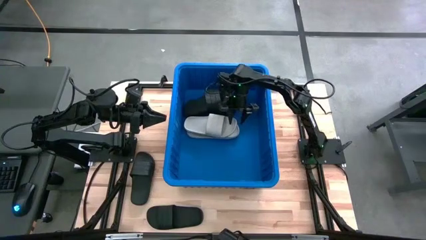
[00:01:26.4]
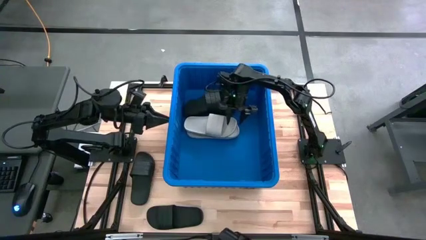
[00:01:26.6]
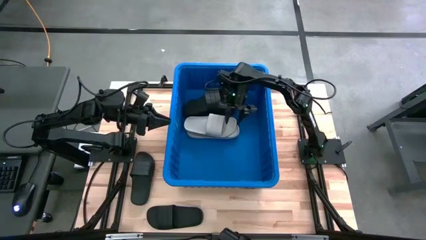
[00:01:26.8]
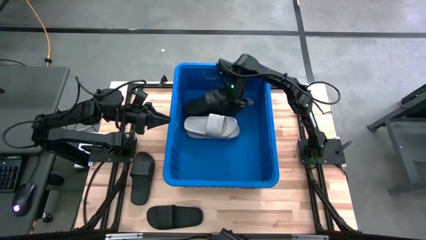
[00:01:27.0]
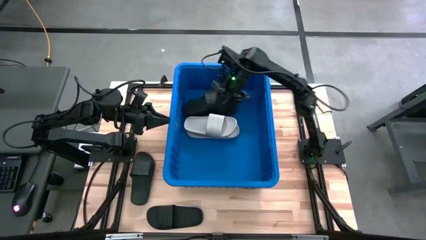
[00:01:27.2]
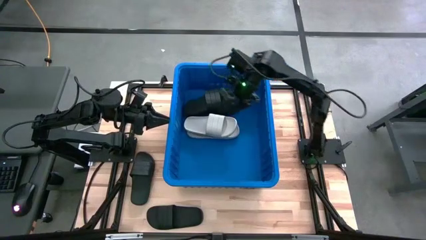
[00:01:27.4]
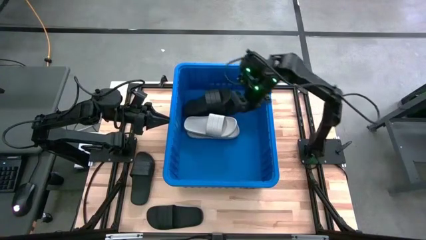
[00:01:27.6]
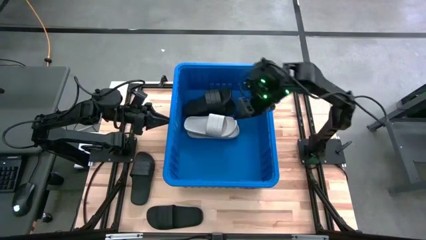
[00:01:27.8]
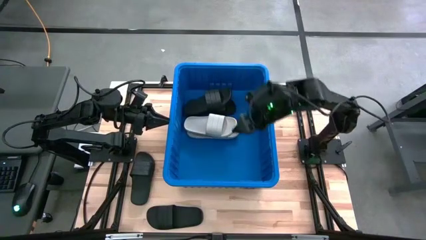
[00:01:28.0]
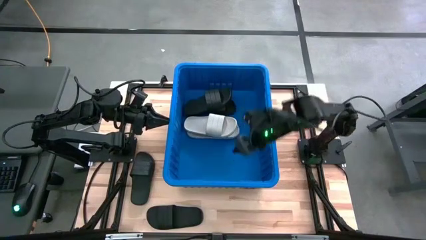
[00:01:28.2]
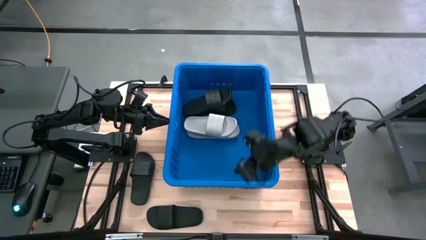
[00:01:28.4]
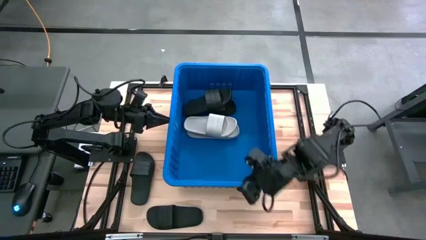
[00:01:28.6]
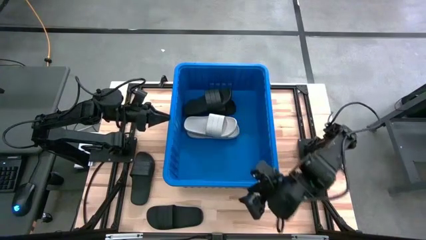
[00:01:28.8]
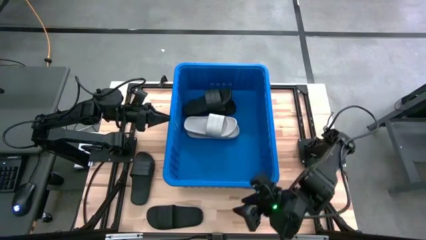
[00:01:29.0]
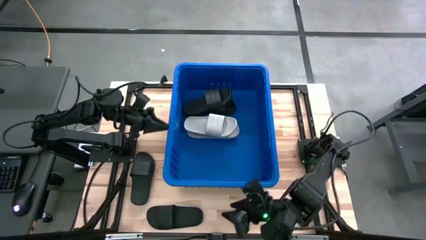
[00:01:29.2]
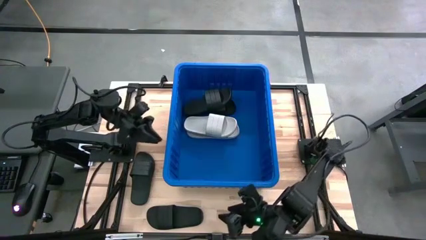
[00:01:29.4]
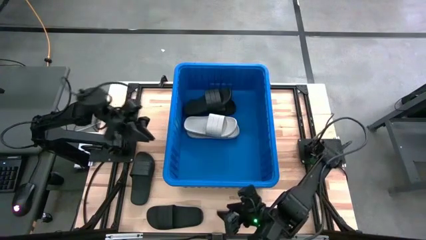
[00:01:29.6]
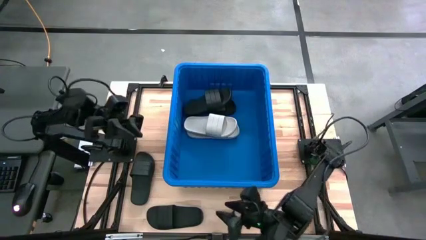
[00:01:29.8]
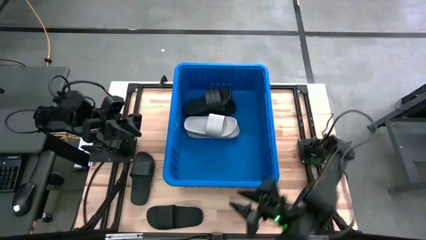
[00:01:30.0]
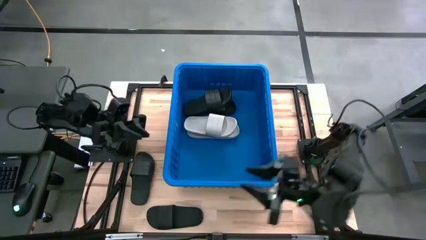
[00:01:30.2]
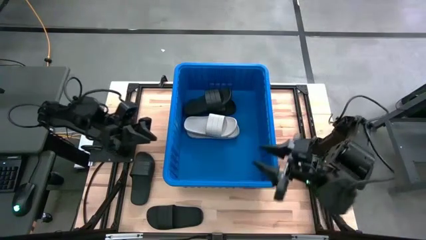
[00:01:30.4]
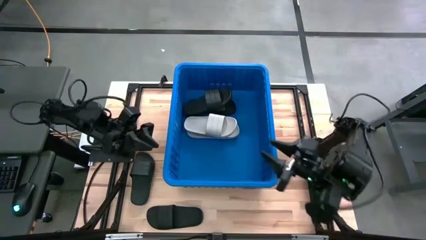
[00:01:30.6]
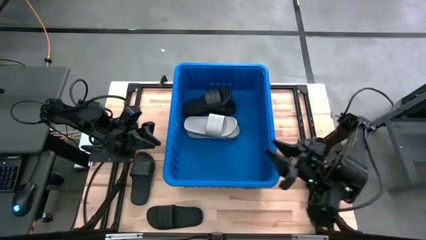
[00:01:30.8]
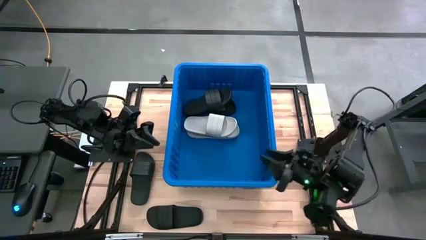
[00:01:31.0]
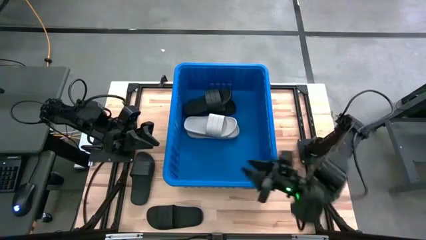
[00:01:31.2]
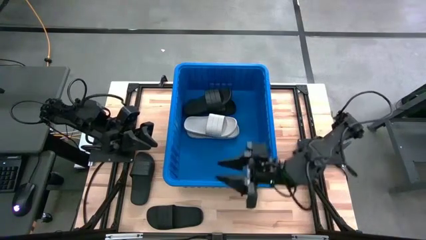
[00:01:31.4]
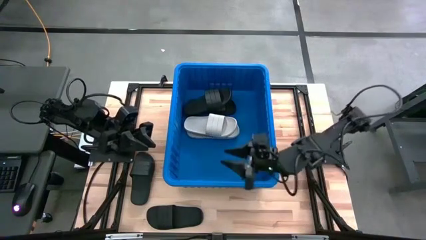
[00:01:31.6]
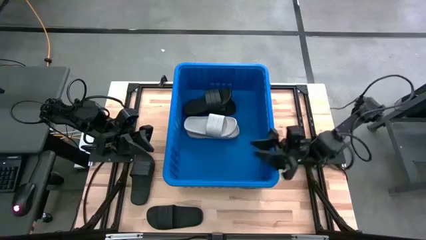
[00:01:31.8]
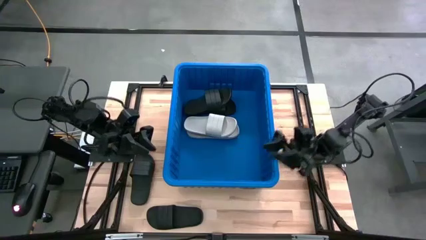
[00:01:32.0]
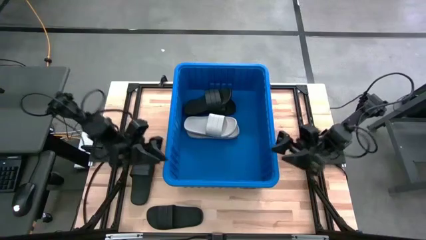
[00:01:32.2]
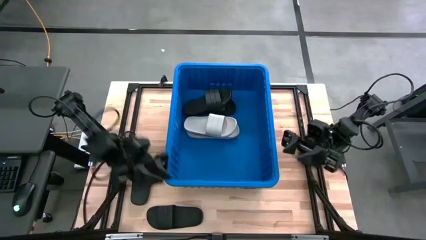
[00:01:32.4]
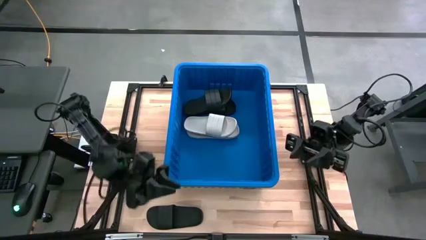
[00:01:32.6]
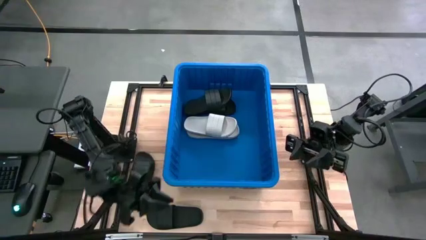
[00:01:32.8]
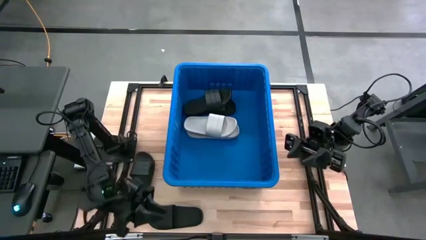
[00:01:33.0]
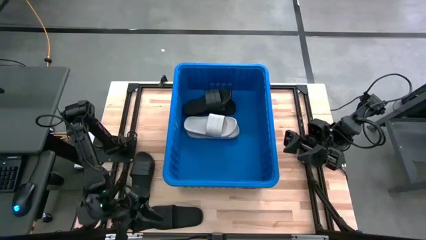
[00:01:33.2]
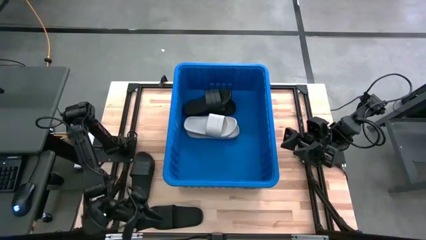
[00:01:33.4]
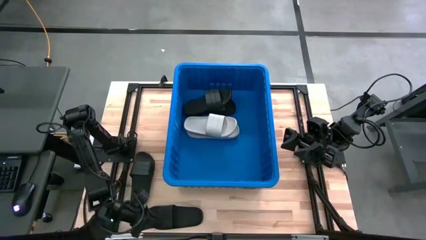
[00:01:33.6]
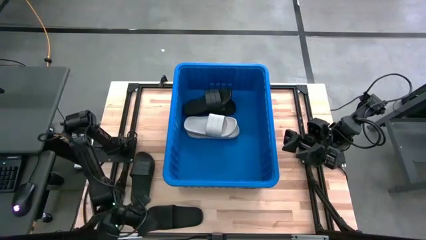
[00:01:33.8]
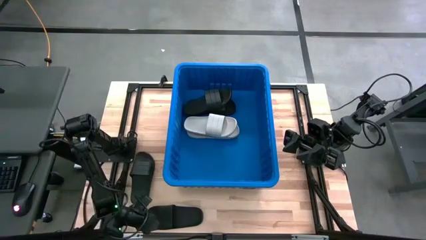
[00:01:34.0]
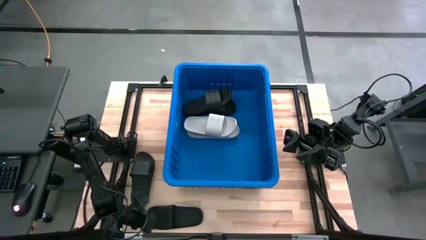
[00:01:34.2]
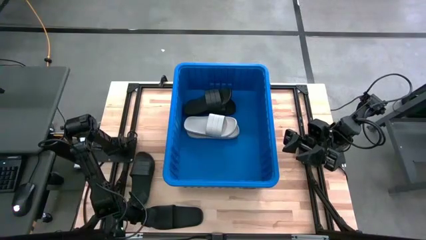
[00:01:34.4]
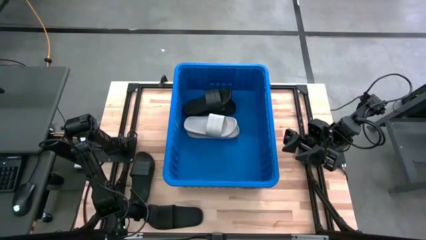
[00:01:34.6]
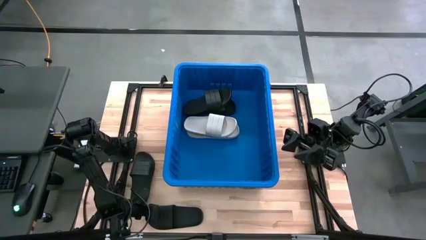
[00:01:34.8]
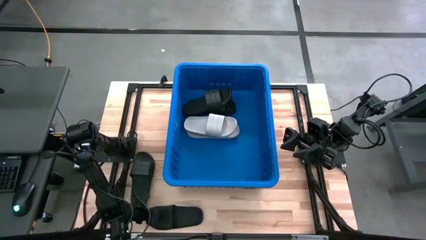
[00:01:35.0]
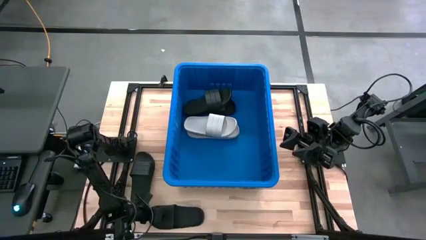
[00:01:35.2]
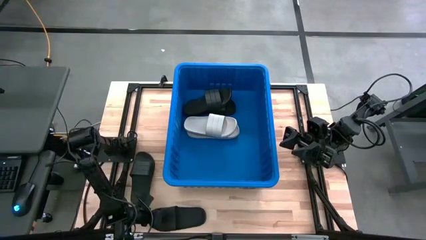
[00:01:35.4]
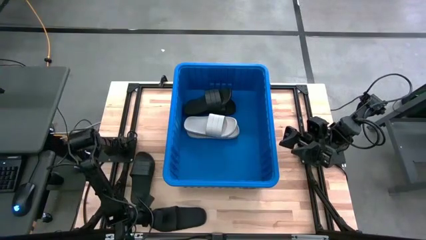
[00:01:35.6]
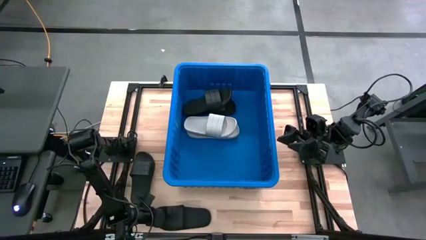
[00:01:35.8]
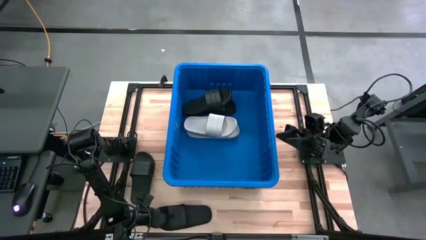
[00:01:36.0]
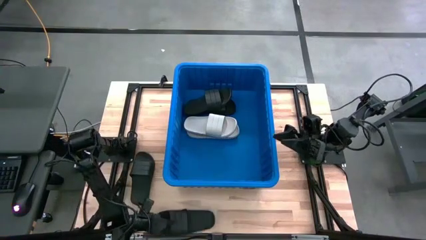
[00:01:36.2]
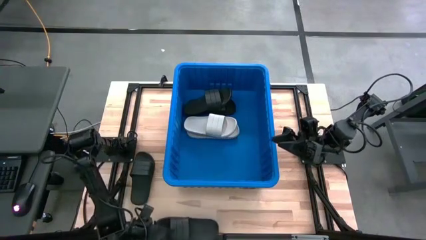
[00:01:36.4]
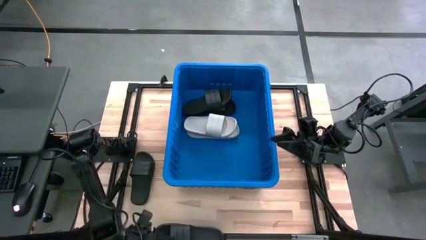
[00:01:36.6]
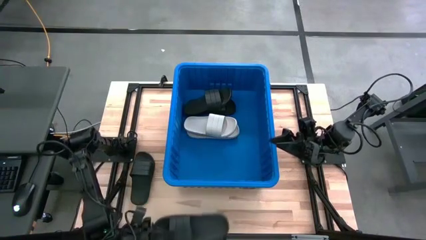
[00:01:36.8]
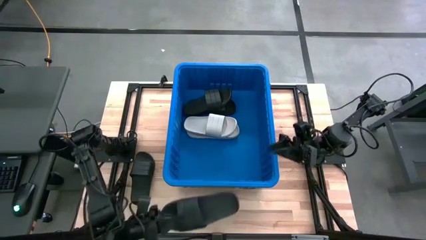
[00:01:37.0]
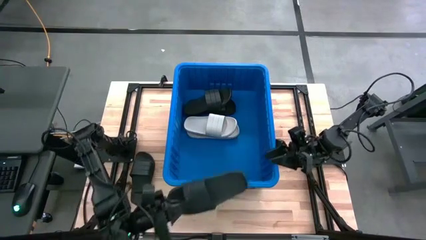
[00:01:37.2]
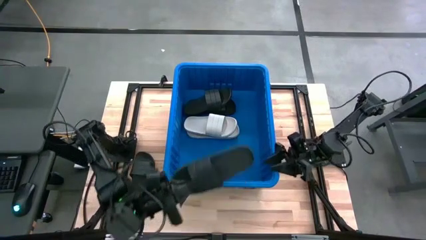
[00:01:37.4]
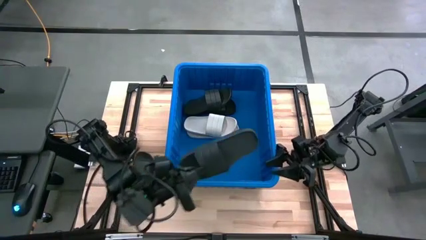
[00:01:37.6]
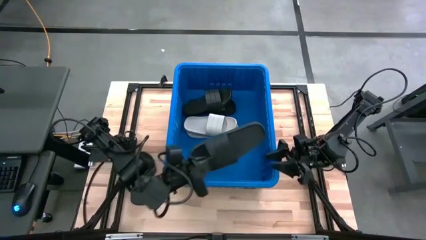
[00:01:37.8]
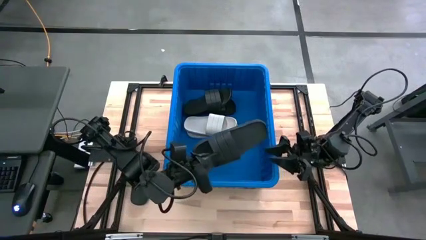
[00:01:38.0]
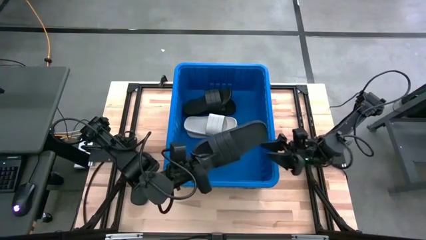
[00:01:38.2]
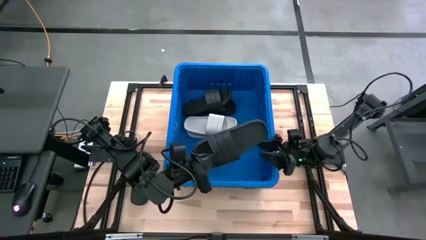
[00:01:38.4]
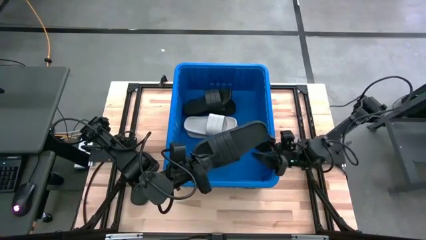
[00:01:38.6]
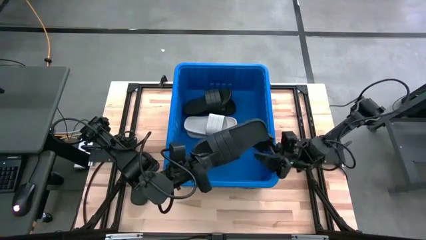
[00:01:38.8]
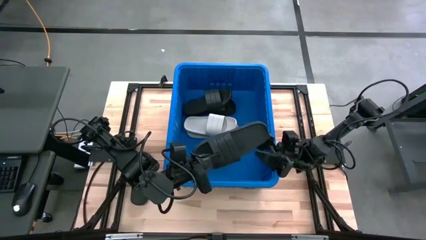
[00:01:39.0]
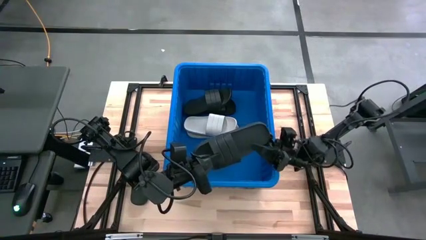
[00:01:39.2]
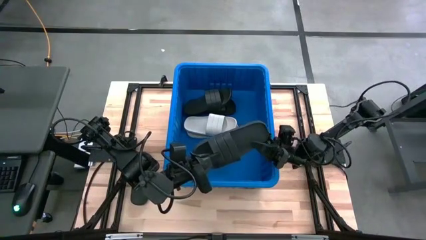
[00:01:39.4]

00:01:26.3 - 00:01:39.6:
Task: Pick and place slides into bin
Put the bottom black slipper into the blue bin
